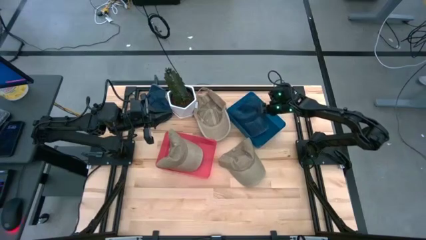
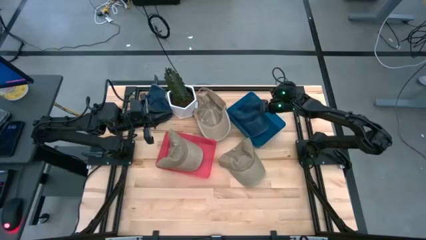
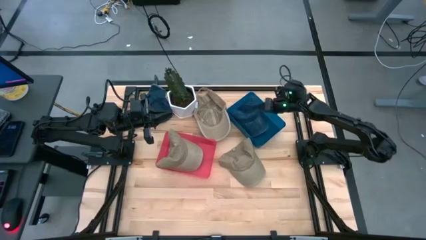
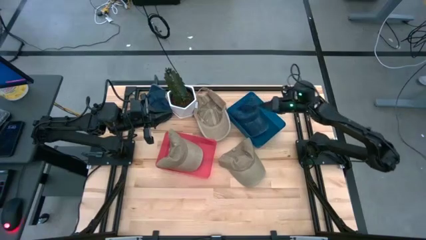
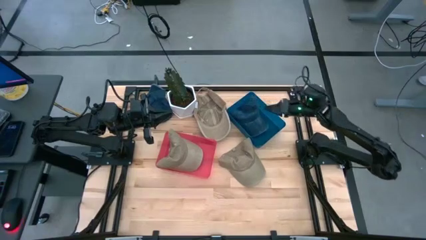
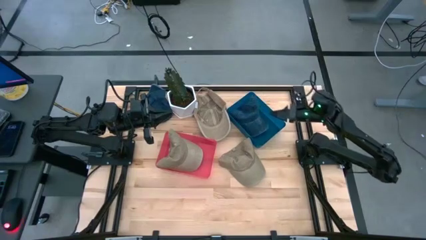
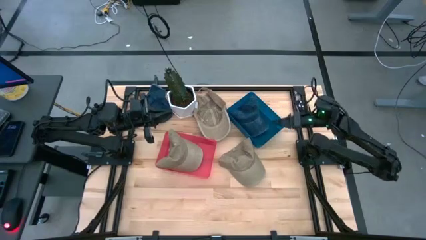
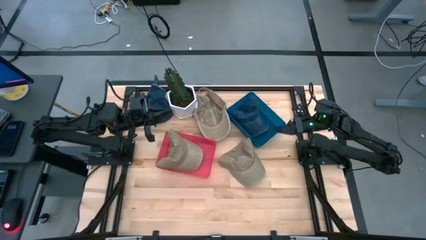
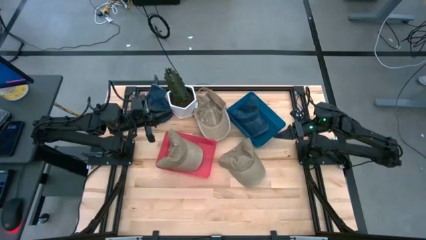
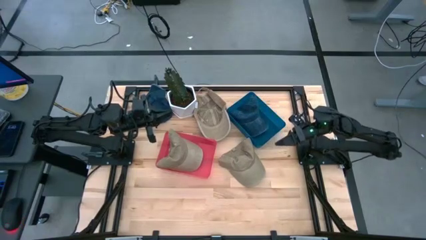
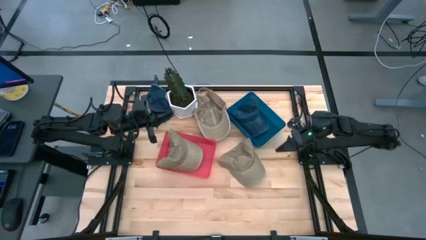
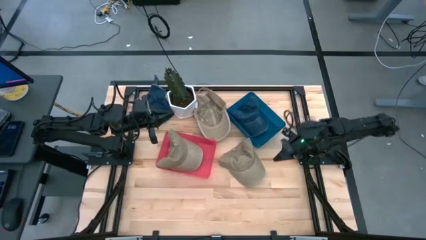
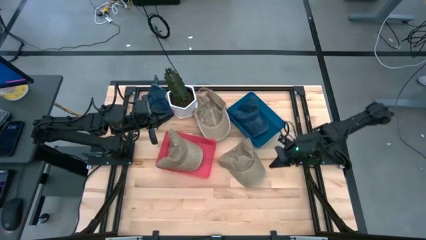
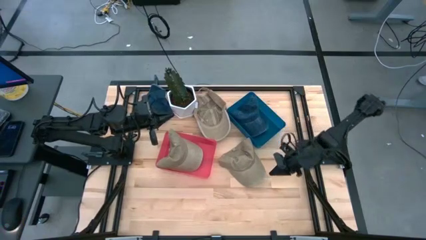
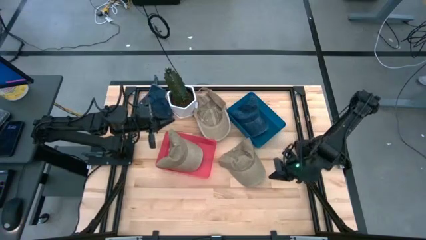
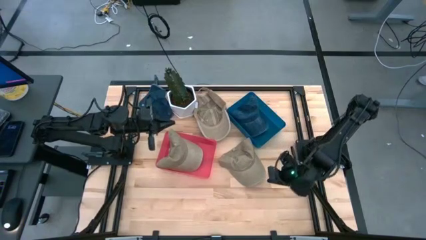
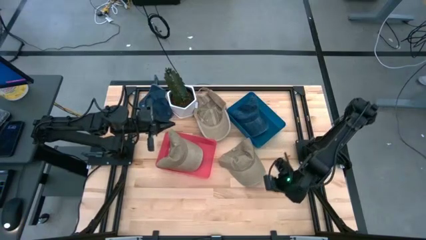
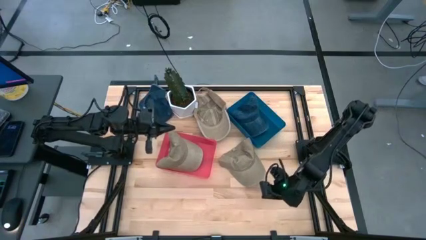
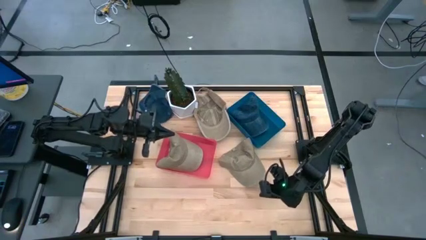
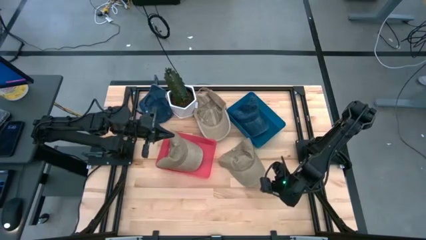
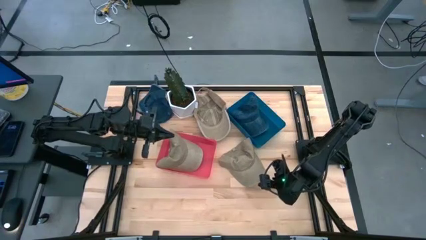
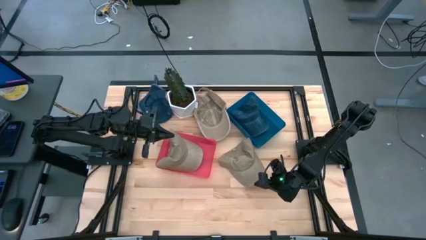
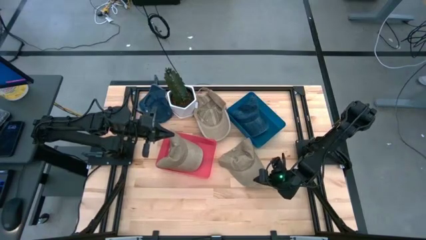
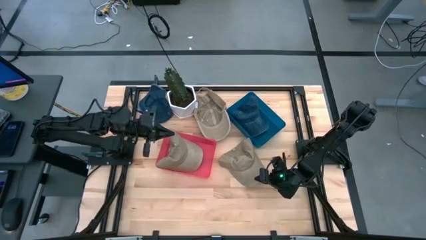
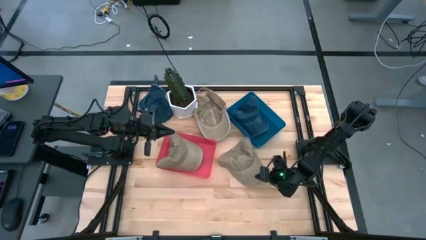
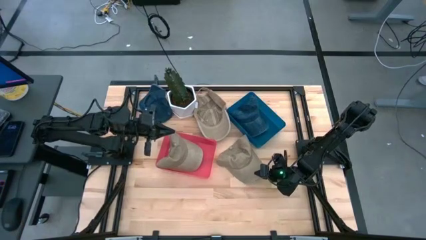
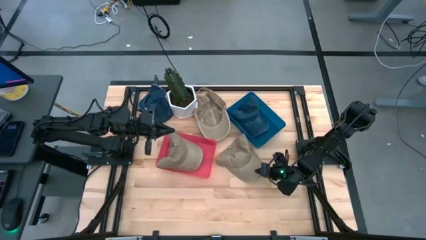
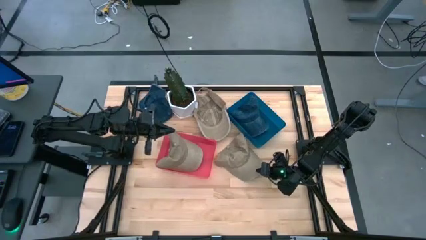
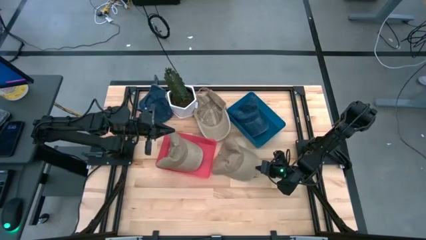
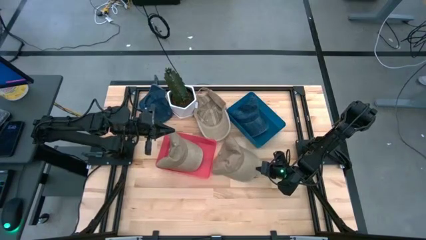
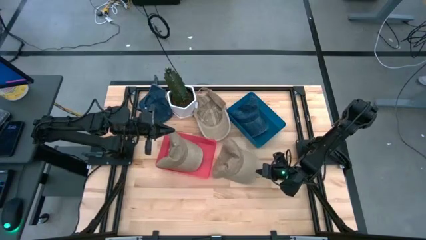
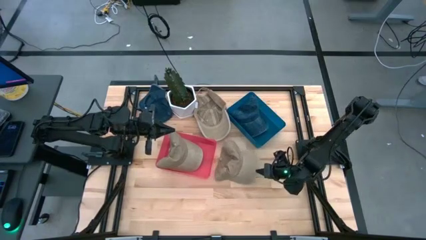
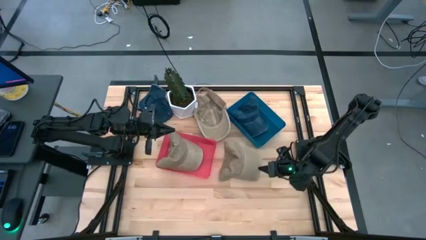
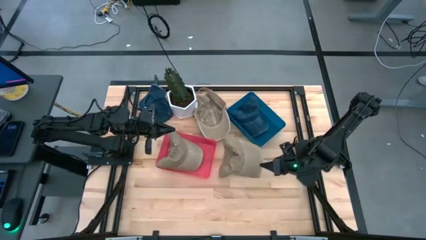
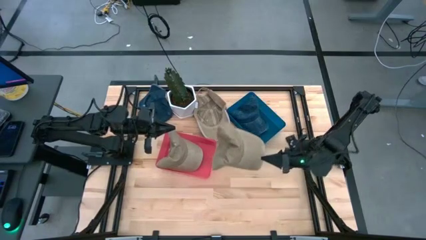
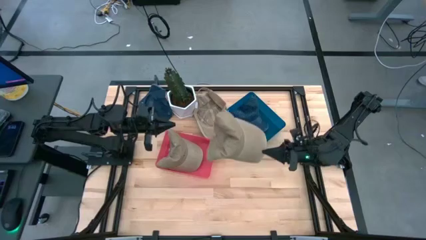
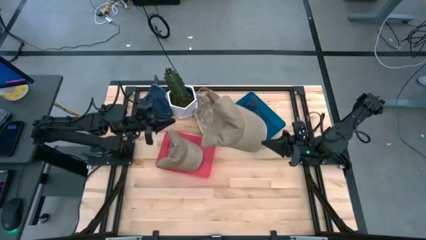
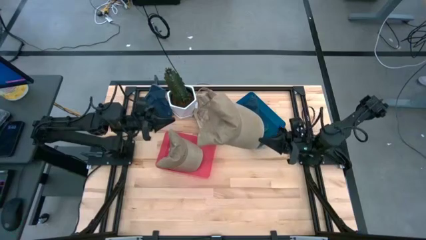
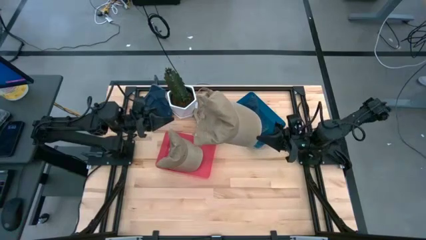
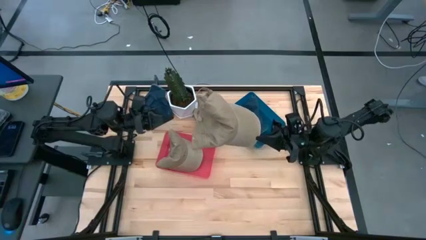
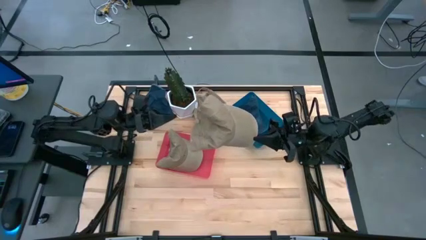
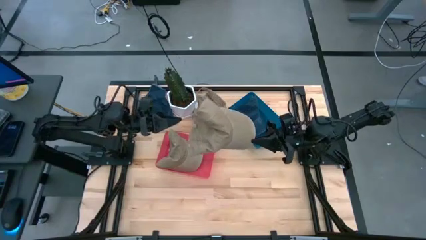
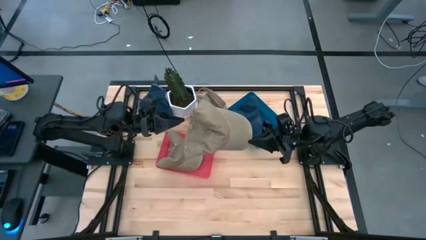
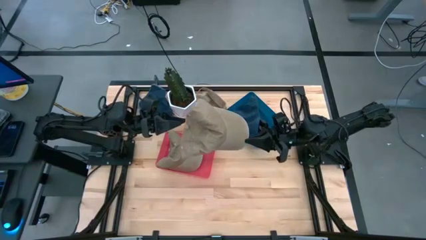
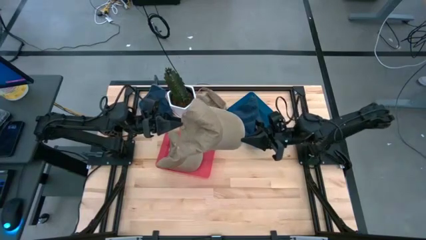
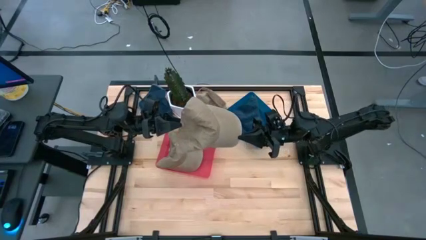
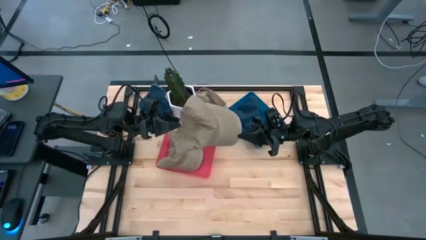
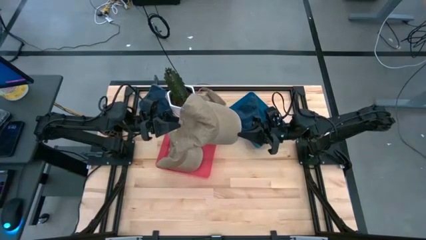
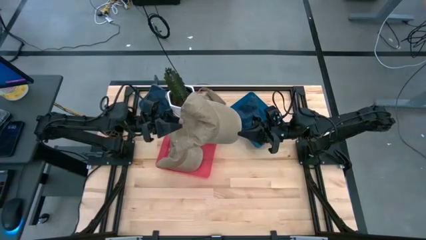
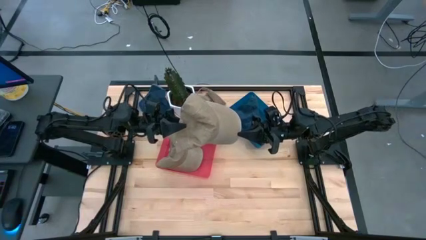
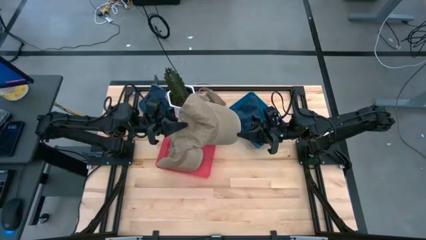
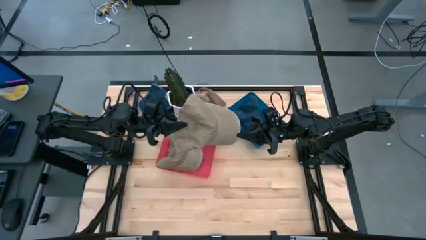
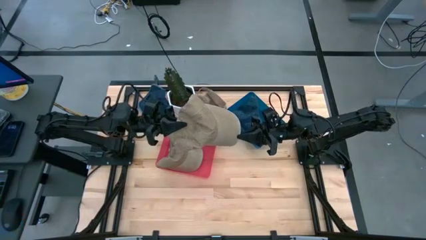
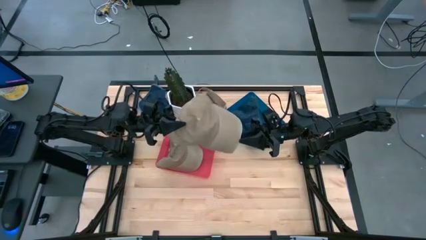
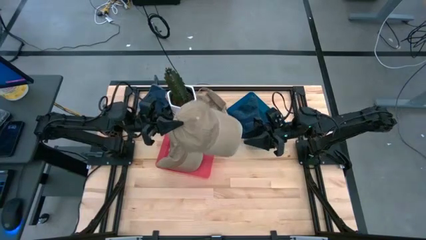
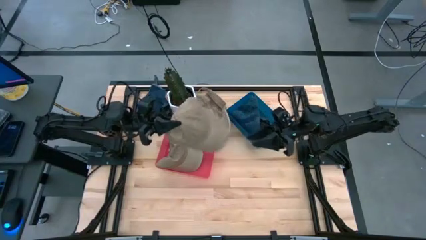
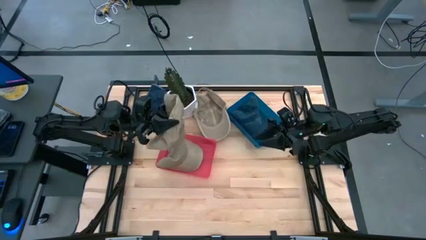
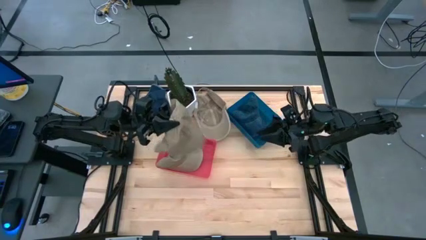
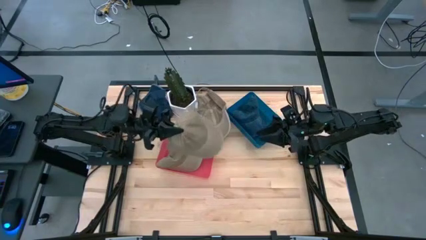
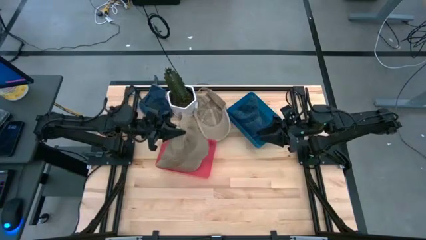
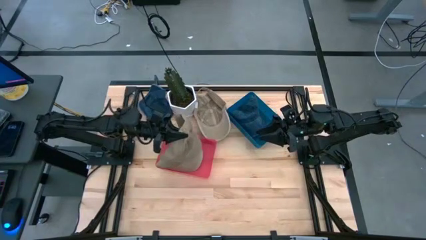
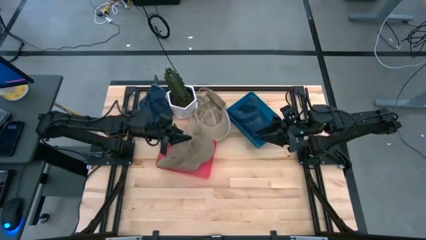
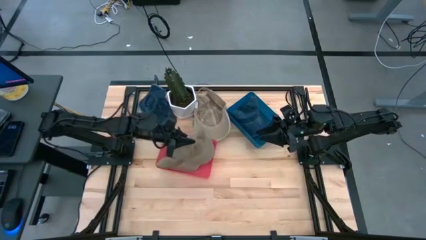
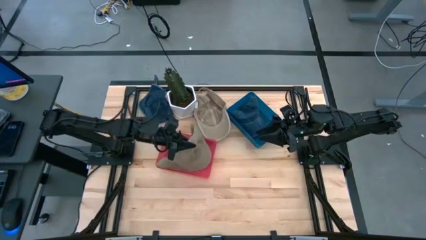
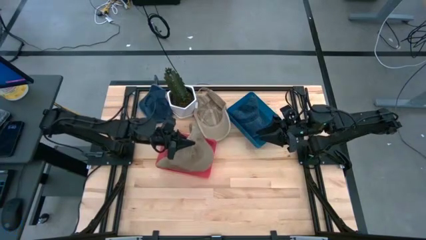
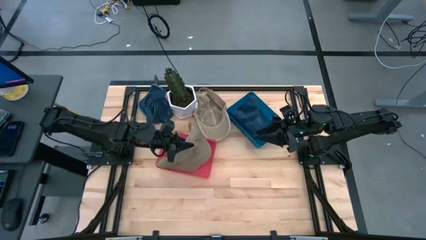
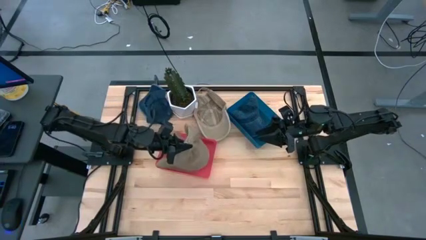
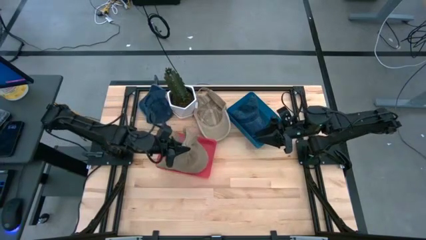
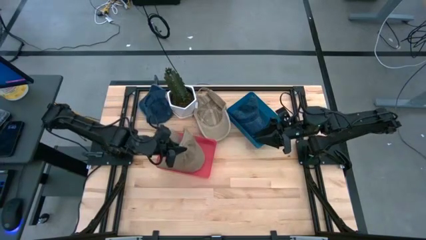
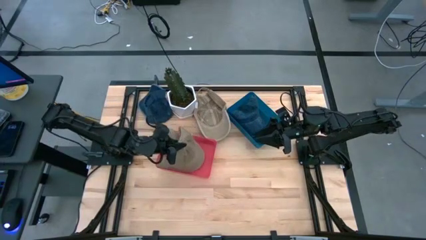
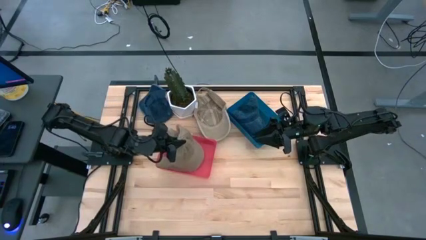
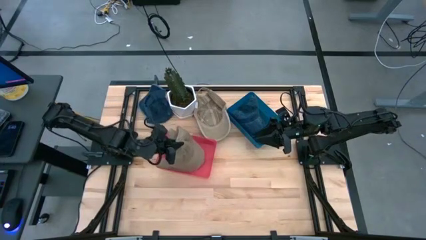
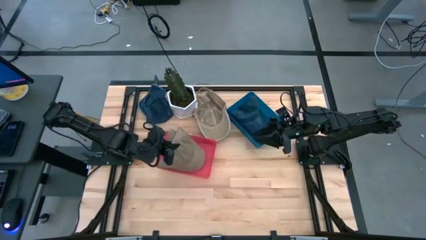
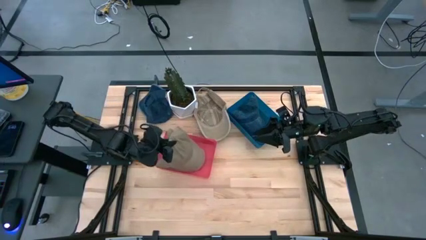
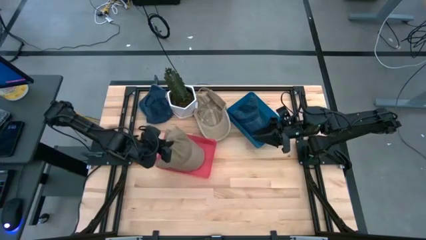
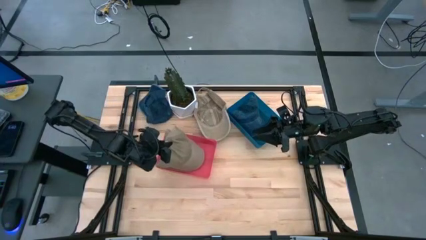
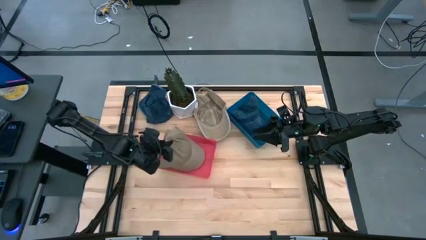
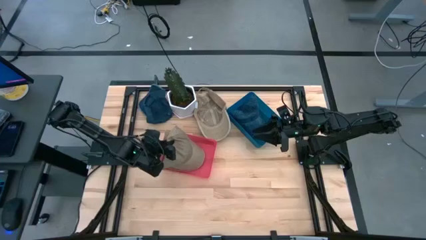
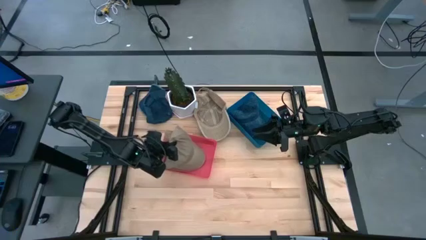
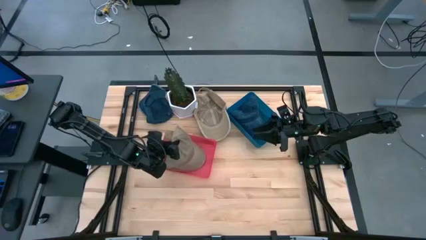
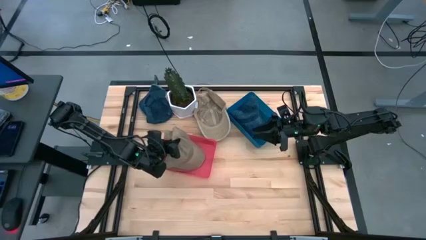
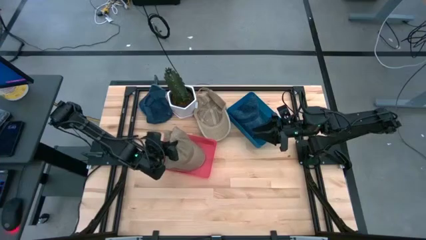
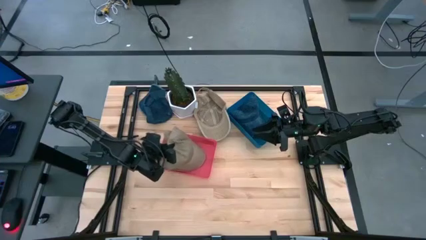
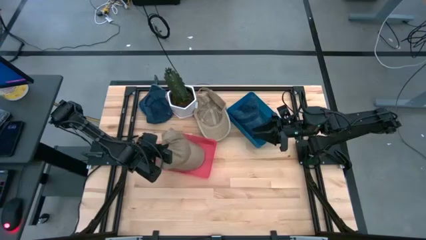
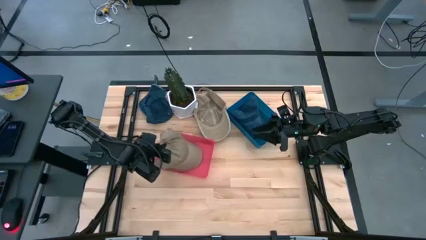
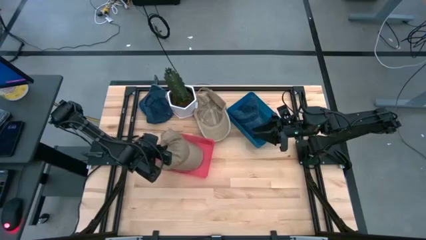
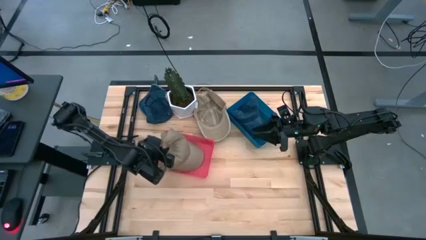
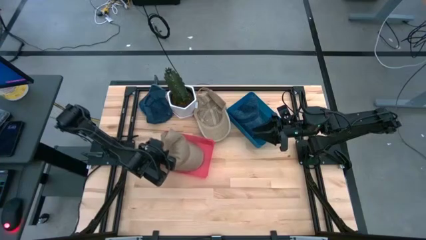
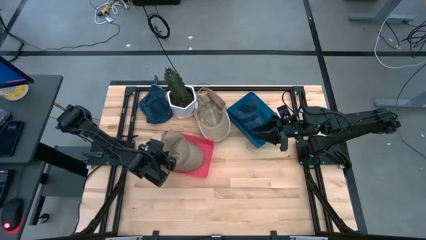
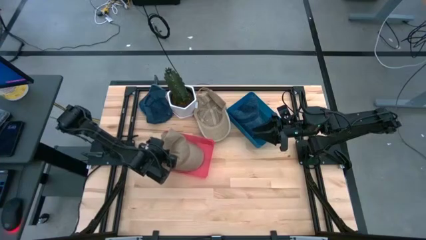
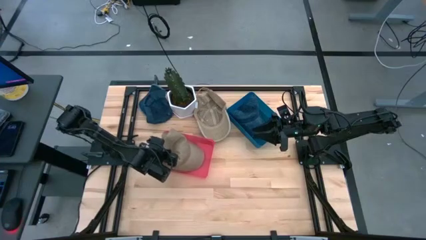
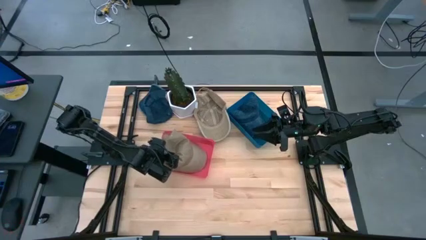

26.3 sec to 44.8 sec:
Task: Pick & Place hat
Put the bottom brown cap into the red bin
